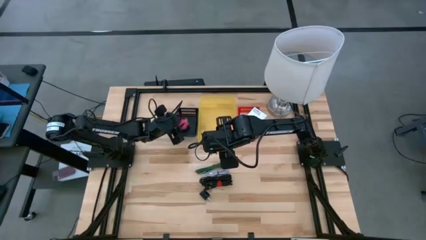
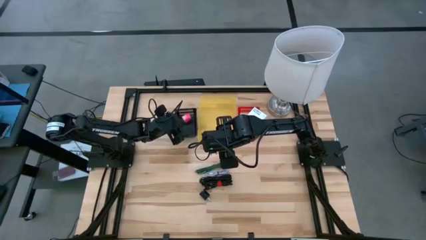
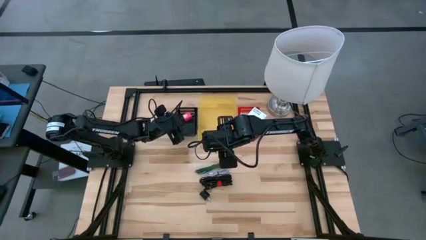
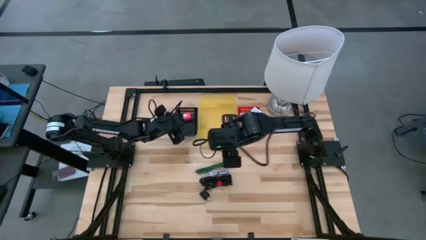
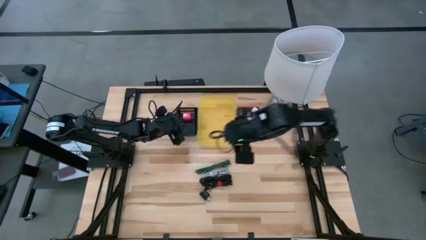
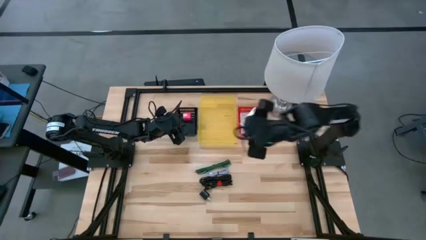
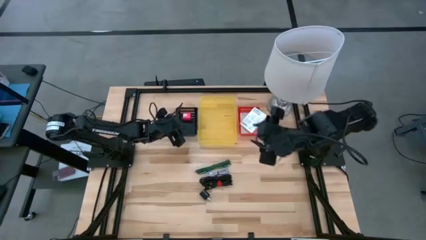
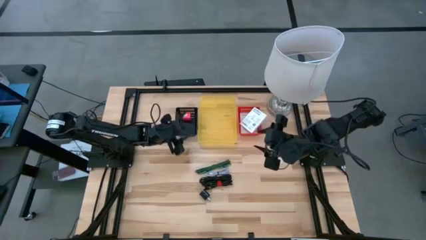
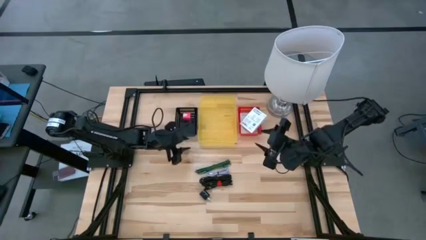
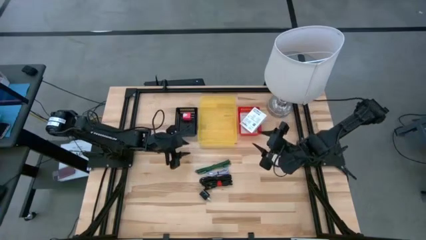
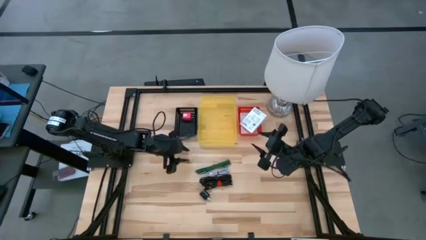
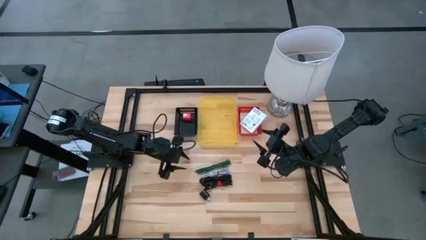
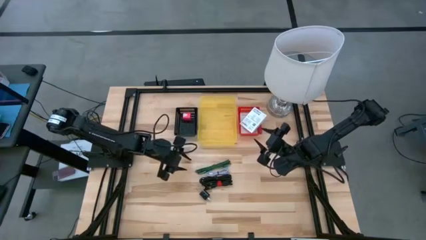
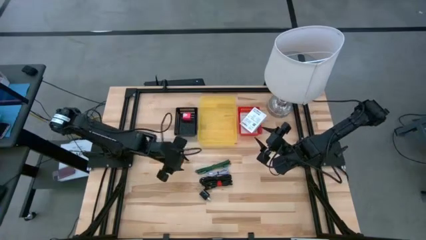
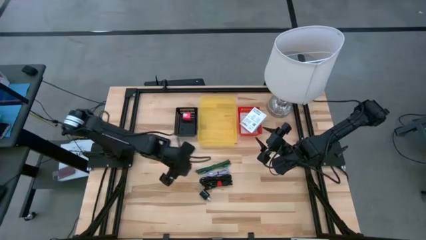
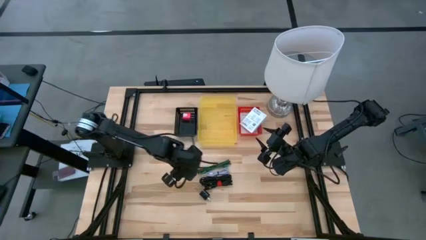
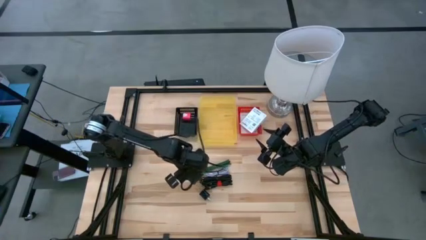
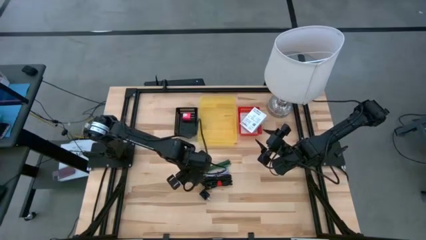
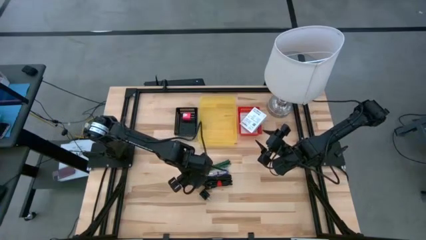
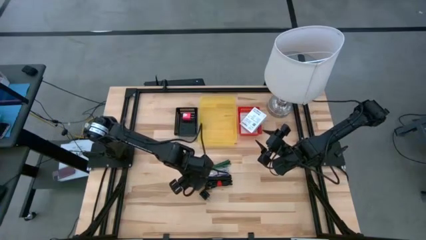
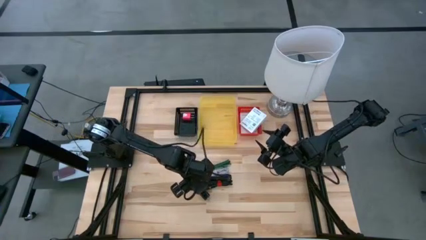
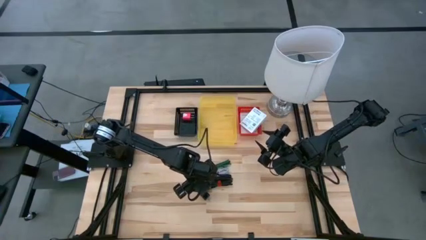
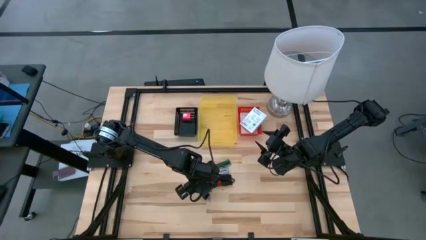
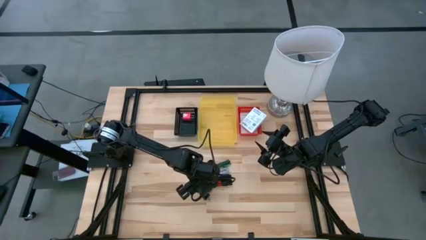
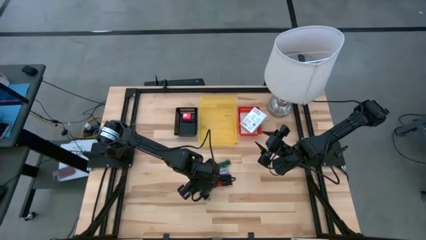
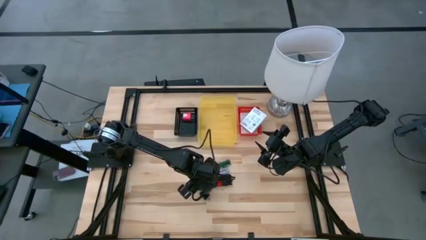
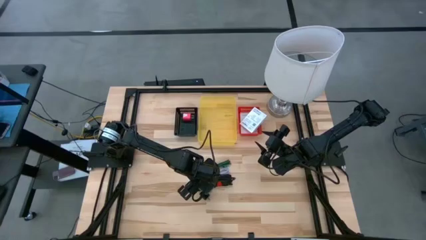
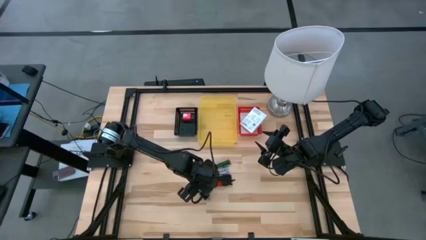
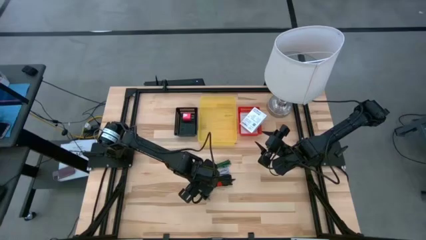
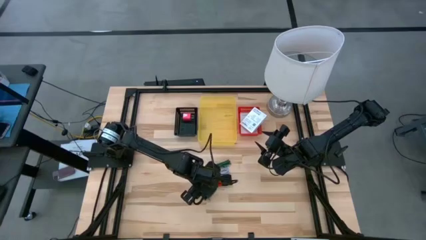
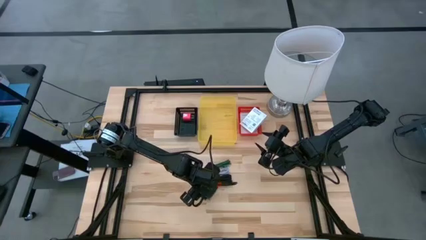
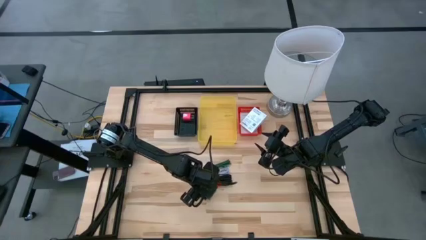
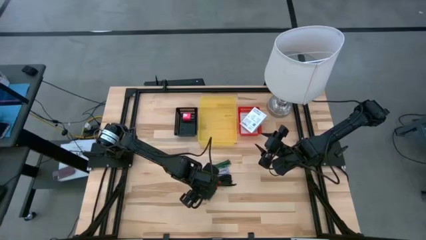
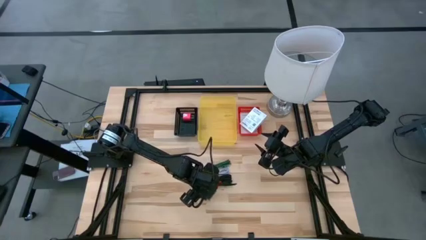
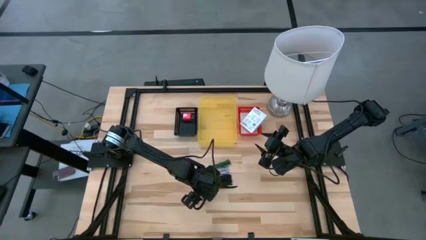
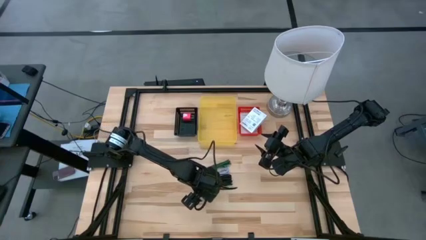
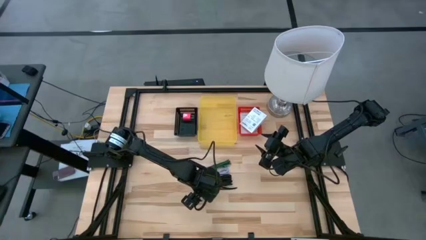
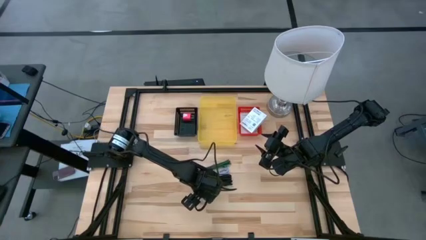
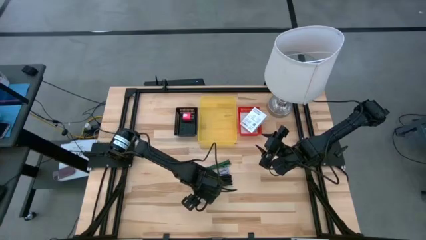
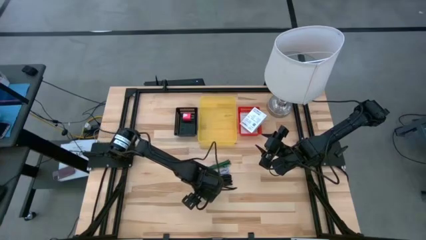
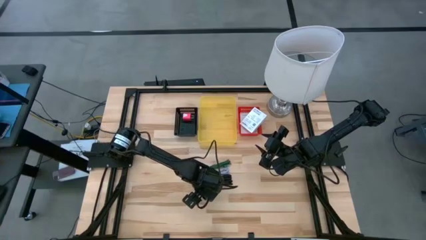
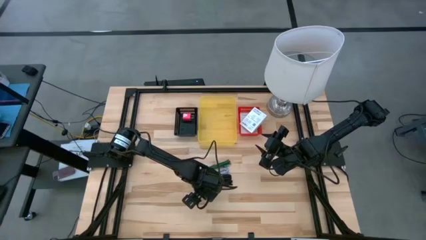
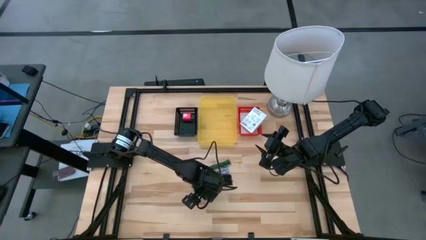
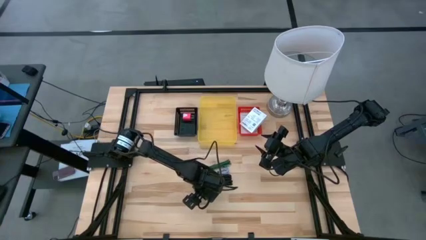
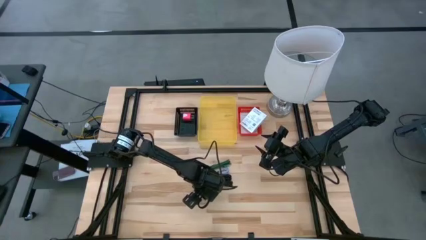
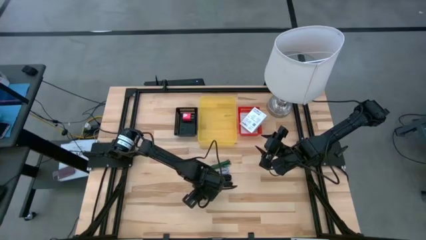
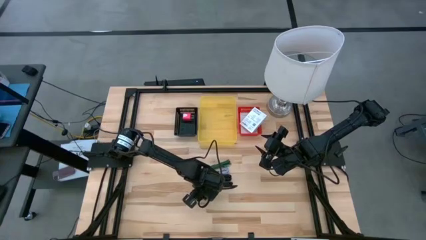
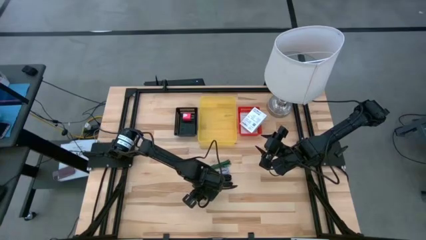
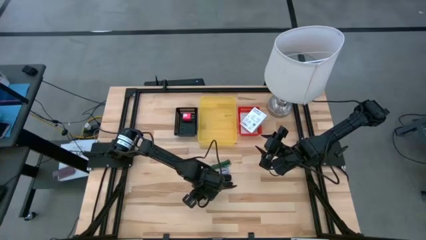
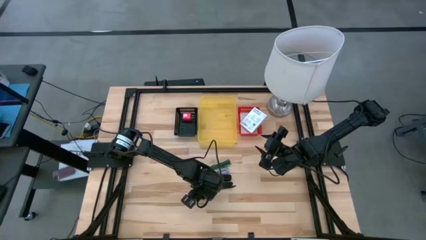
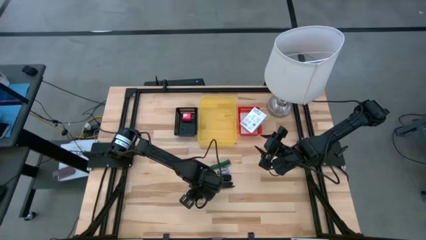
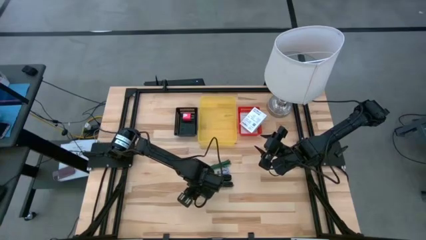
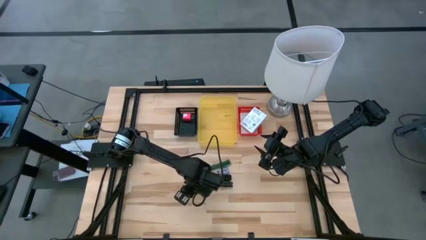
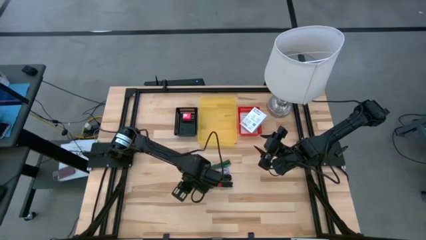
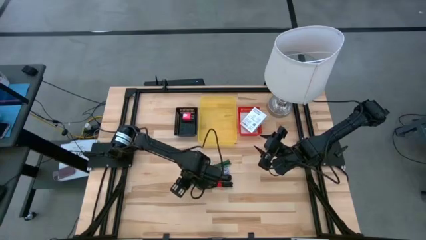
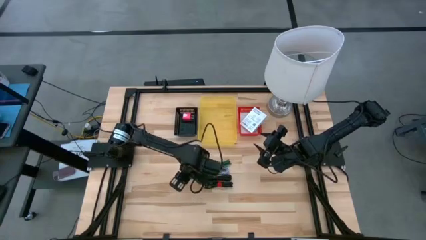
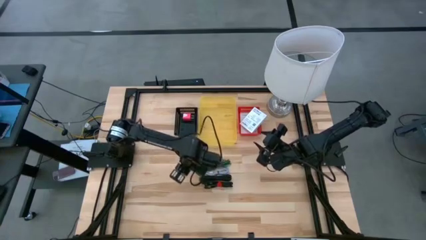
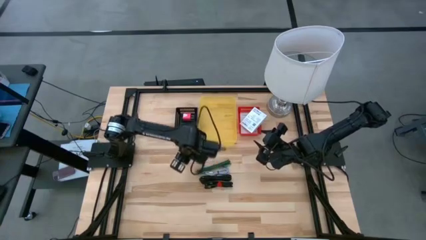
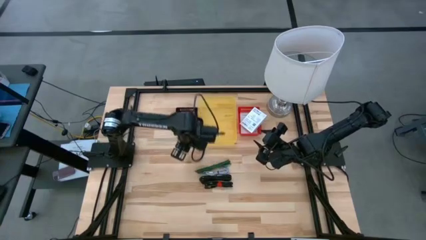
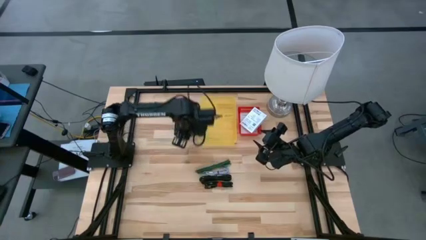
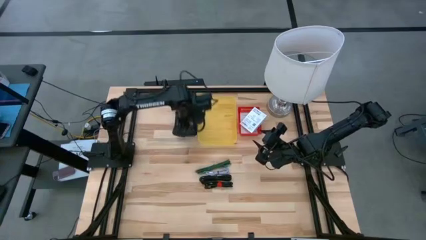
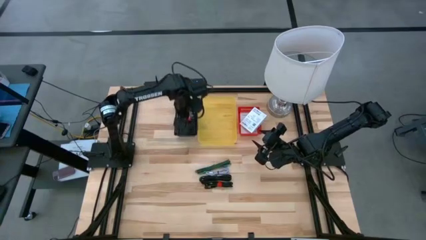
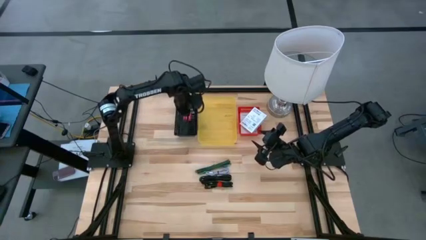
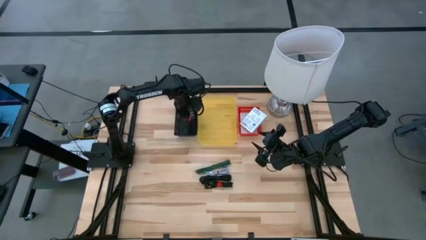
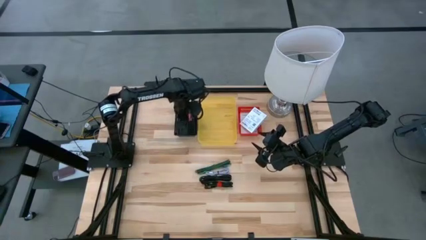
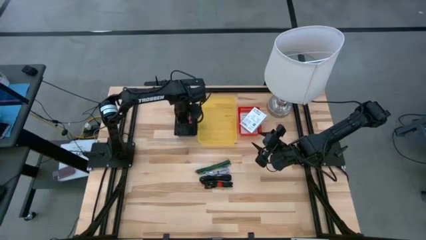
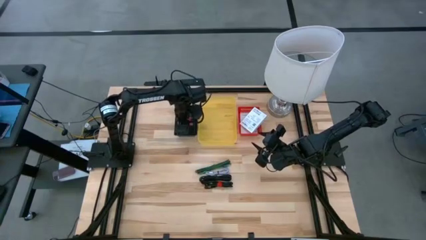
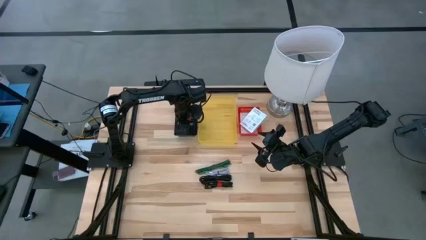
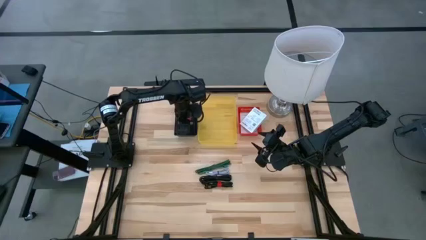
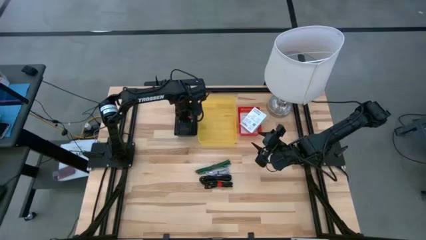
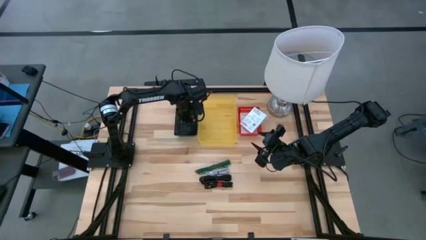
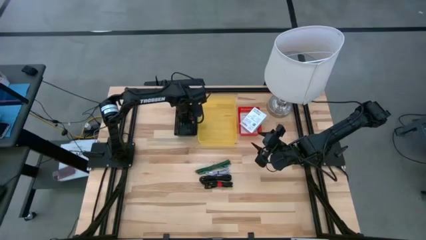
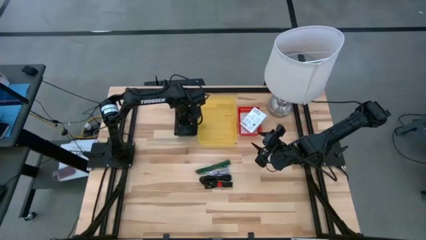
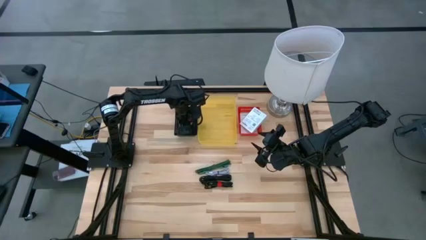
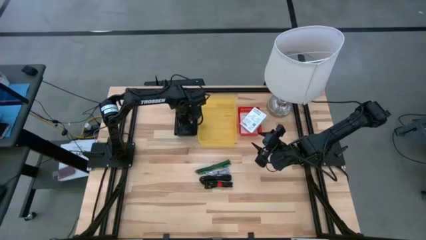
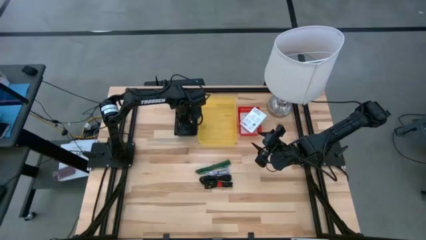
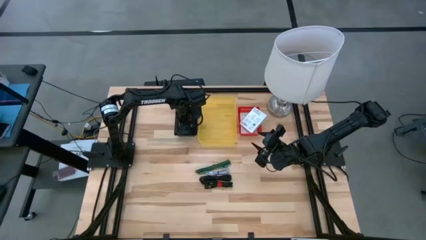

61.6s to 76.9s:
Task: Pick and place items into bin
Put the black charger adapter into the black bin
